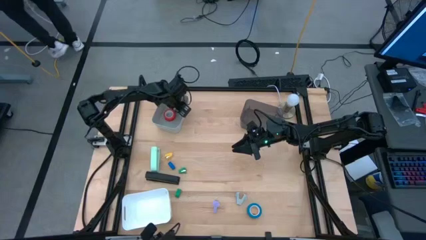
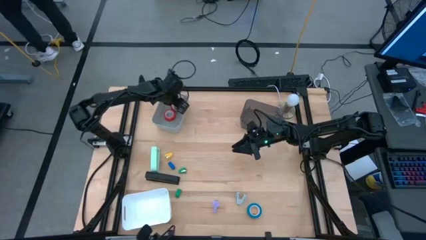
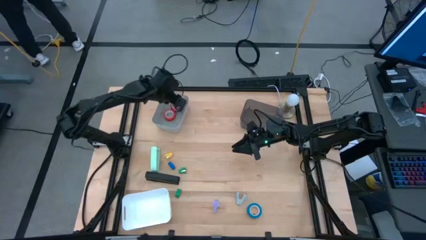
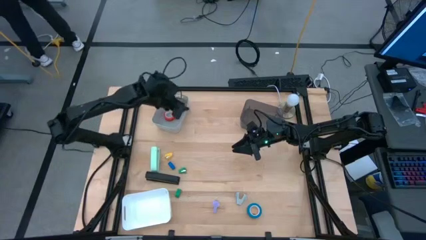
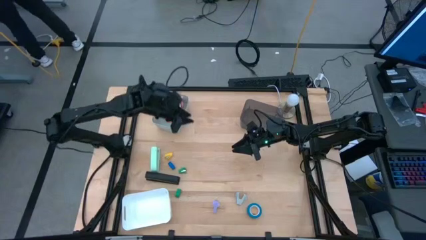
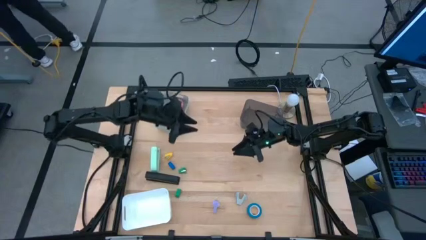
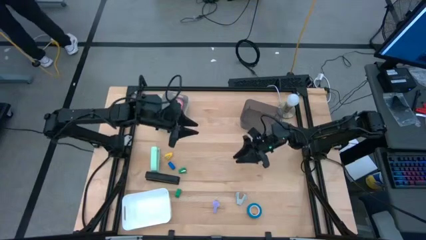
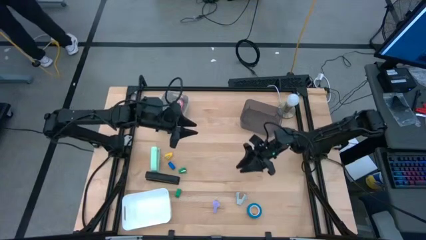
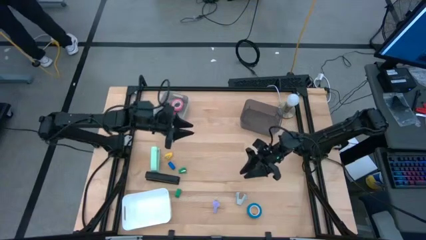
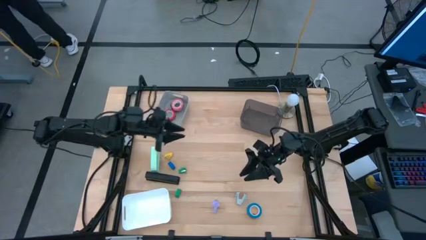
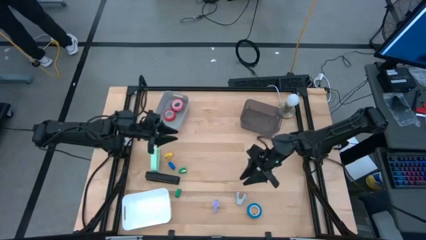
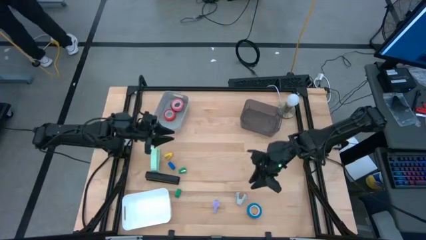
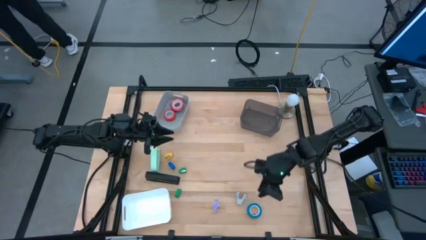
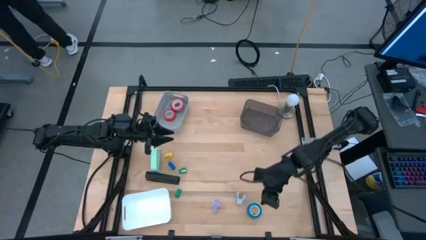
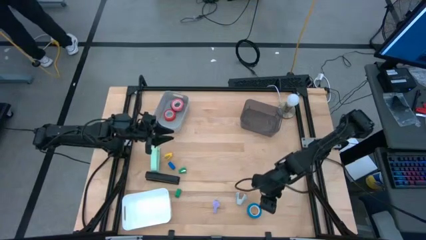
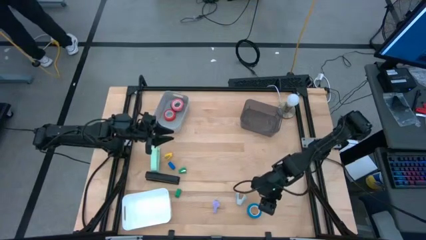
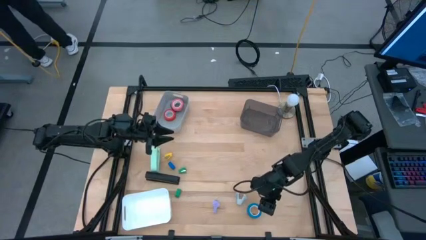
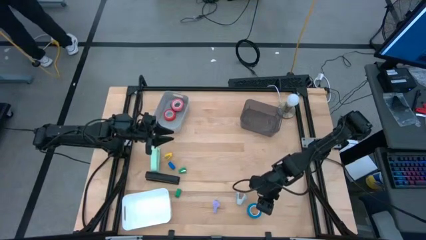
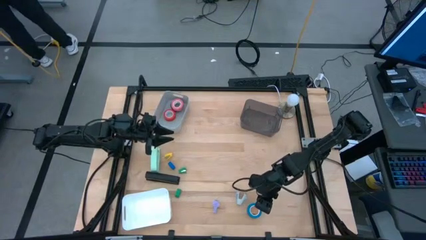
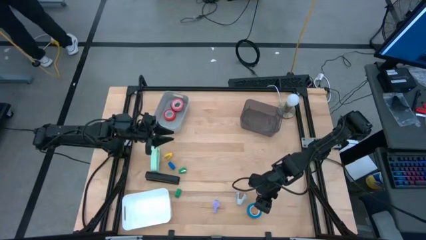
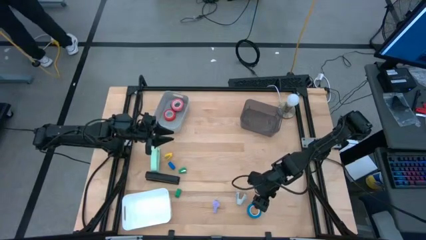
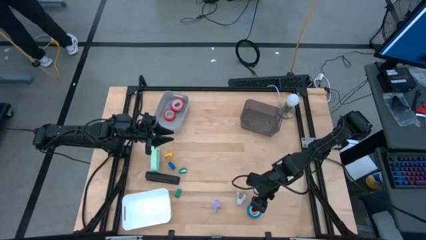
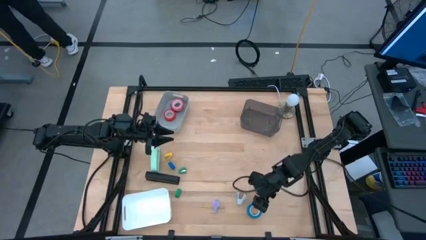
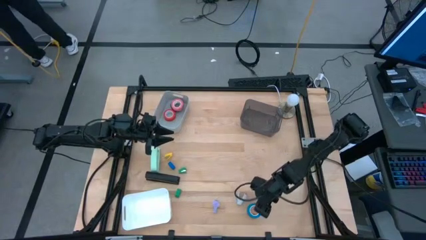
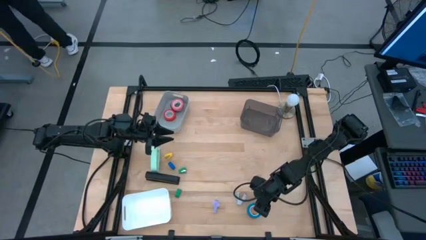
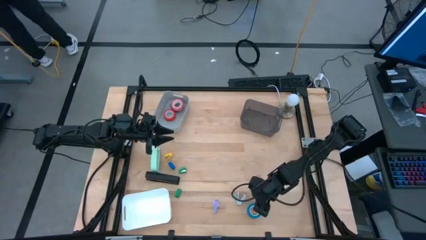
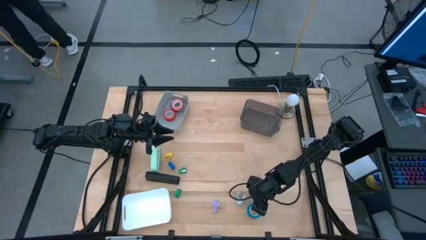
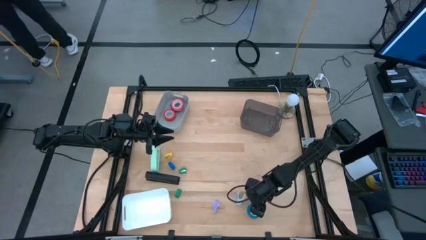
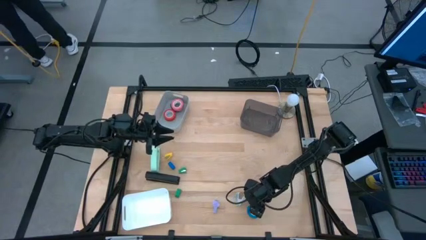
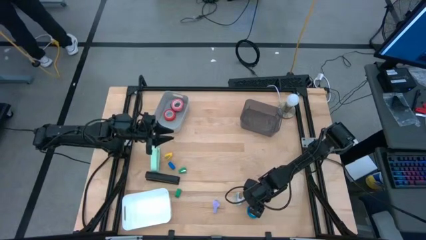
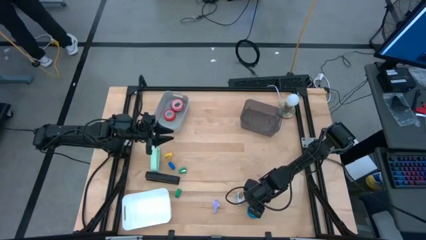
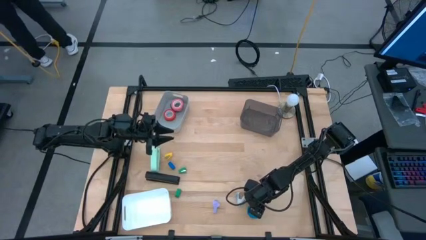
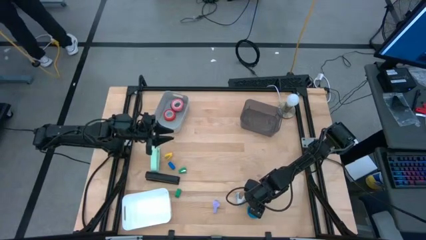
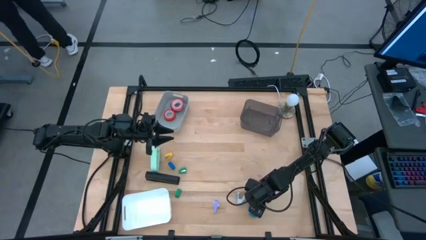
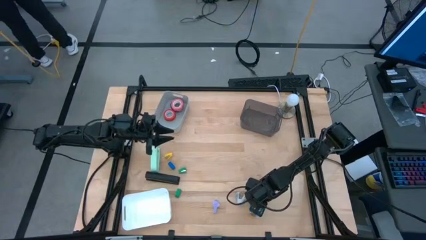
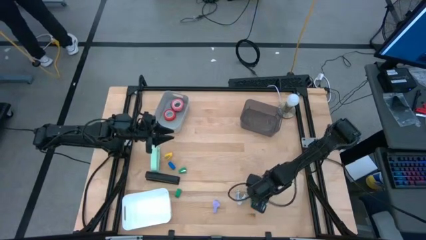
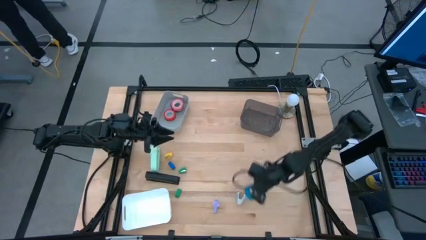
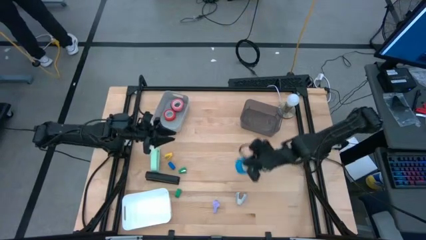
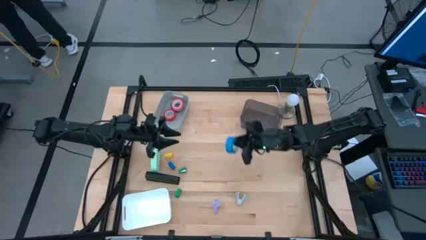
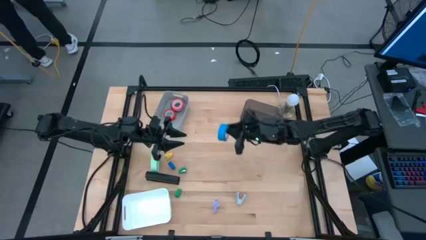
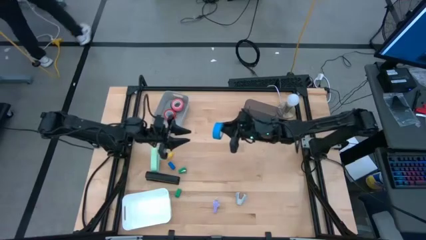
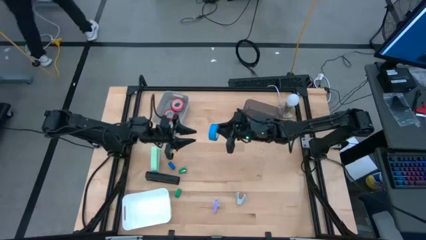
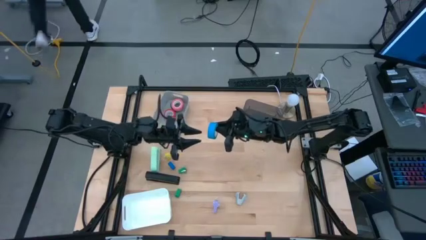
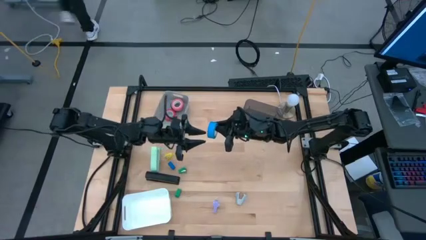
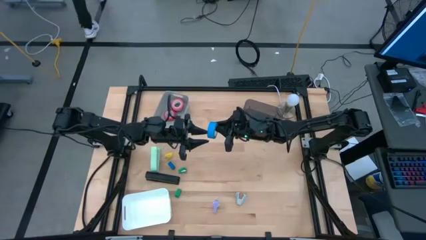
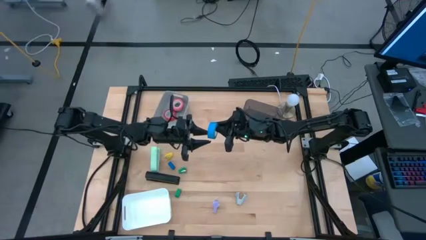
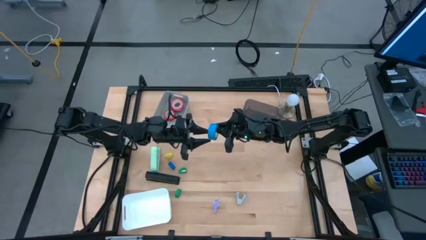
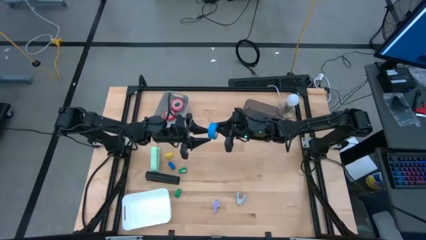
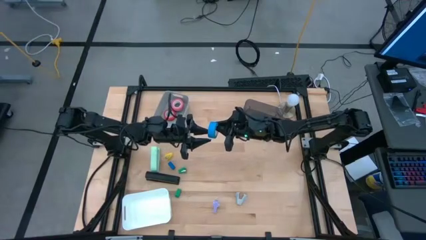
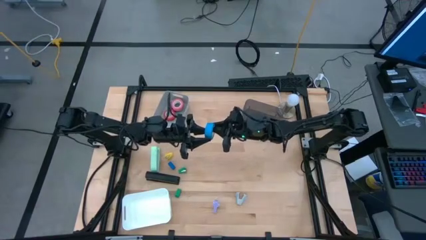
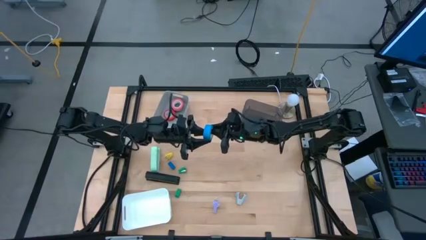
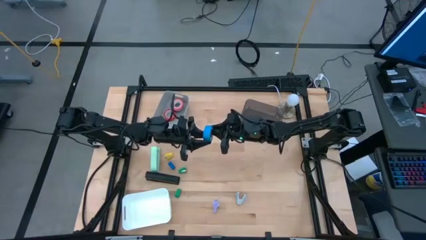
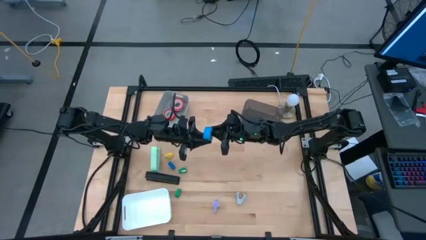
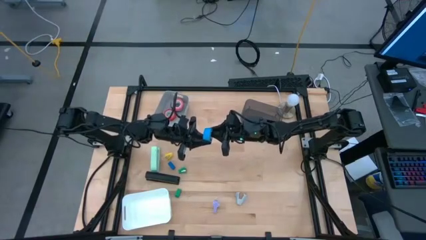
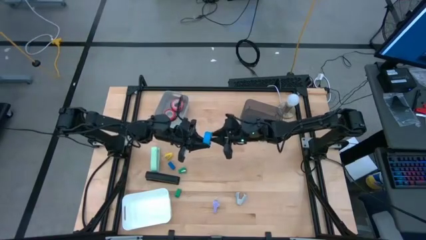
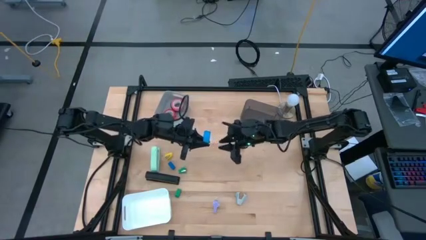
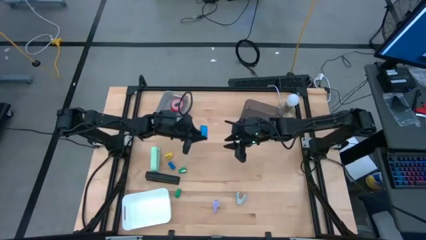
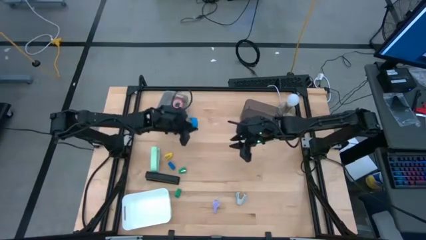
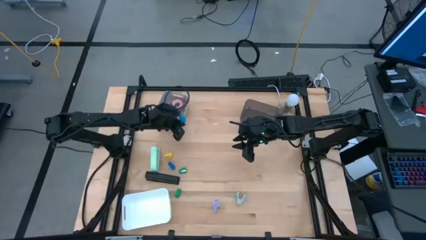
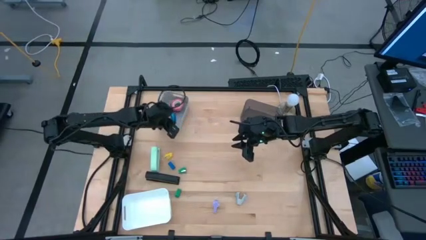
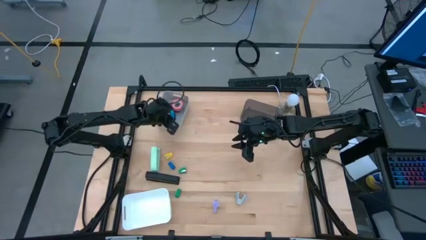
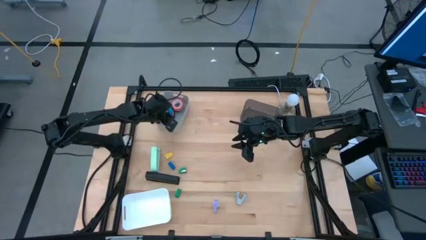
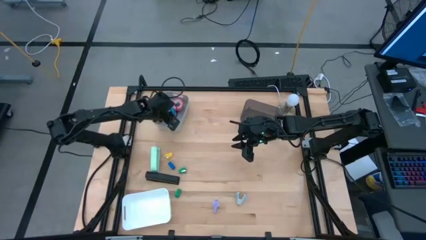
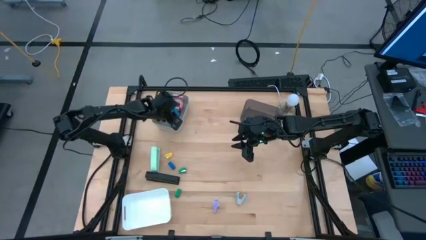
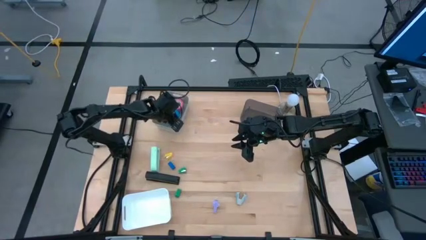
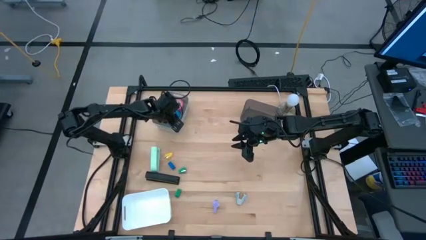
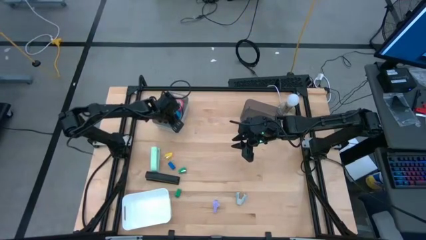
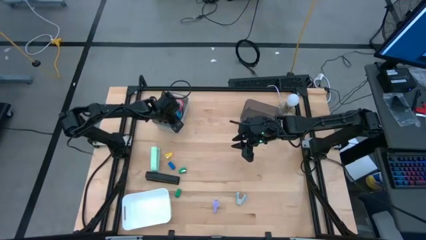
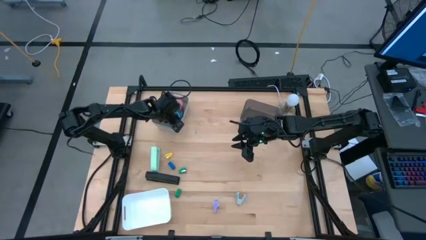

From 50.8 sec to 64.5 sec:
Task: Pick and place Stapler, Stapler remover, tape
Put the light blue tape into the gray bin
